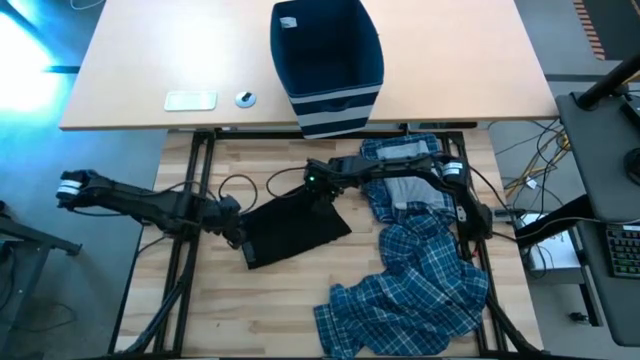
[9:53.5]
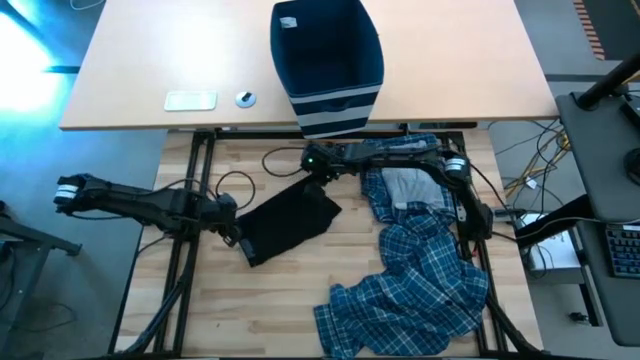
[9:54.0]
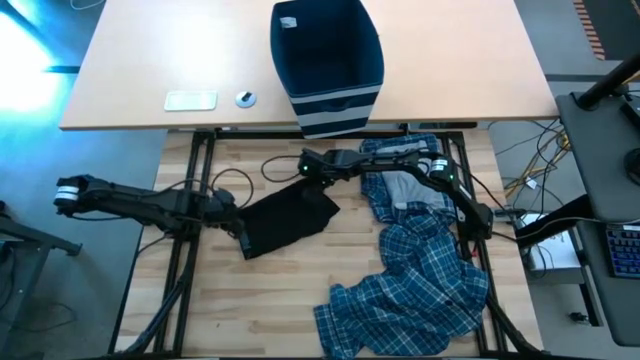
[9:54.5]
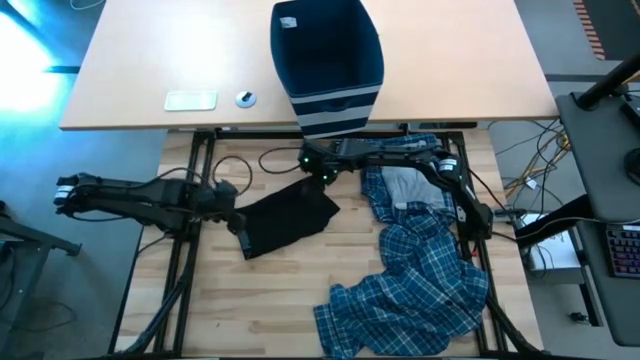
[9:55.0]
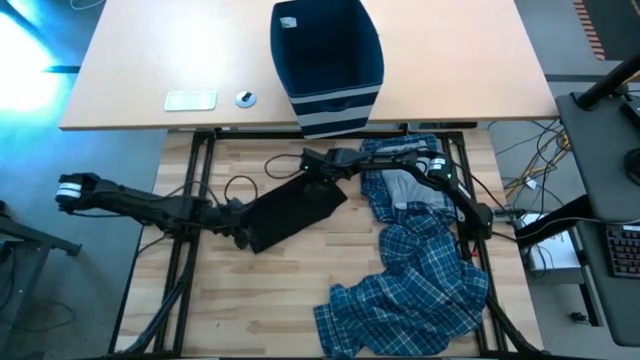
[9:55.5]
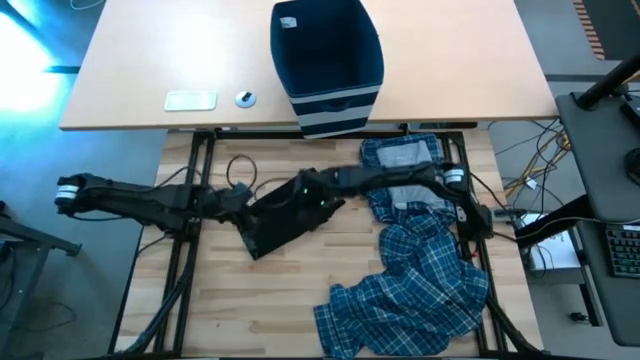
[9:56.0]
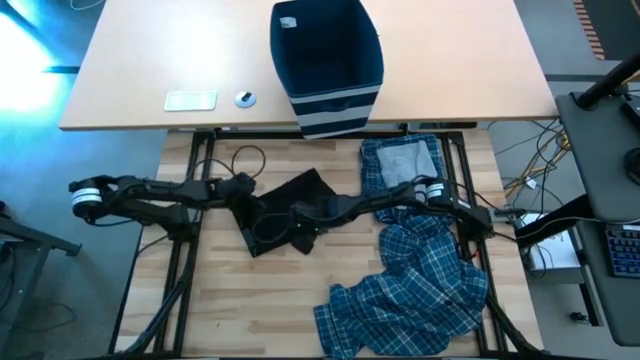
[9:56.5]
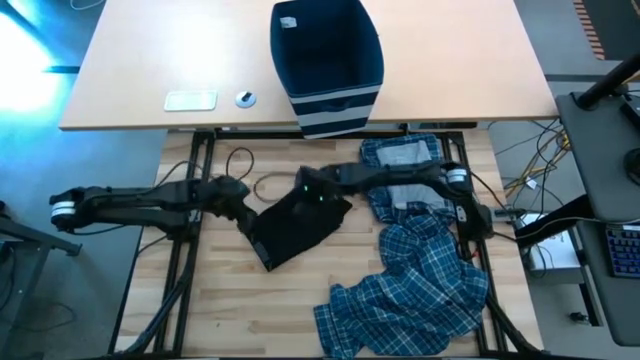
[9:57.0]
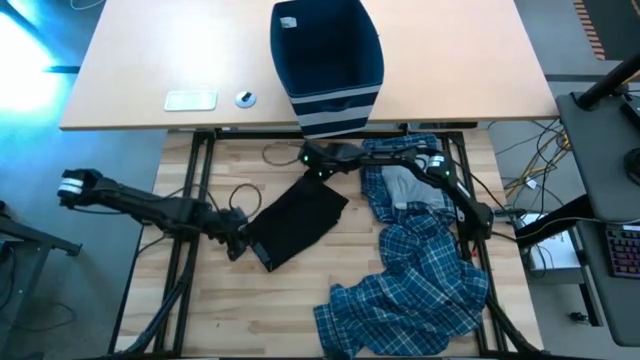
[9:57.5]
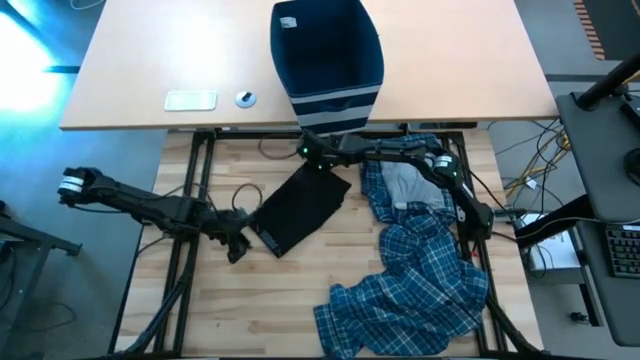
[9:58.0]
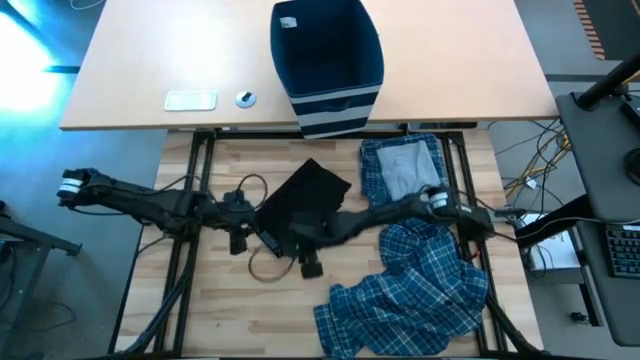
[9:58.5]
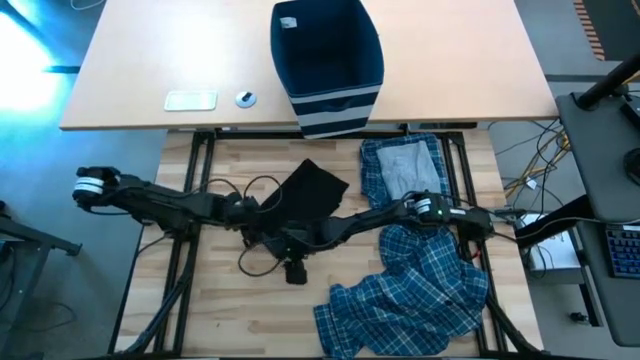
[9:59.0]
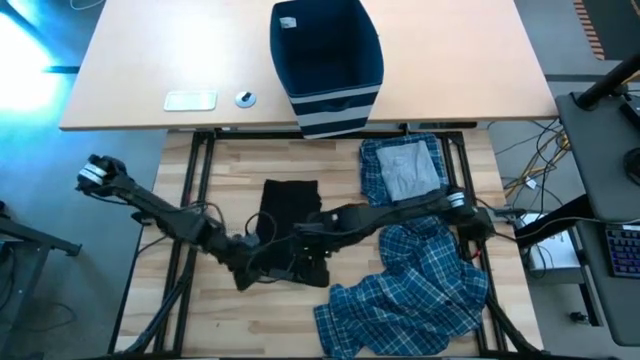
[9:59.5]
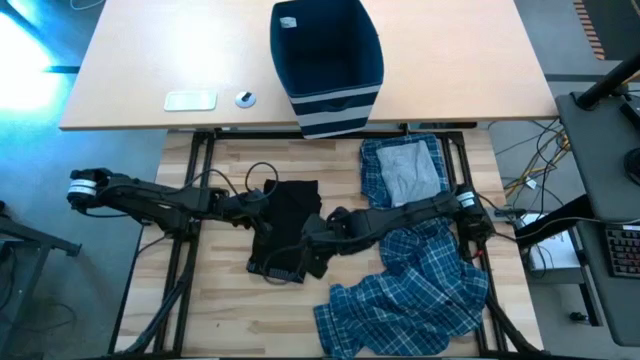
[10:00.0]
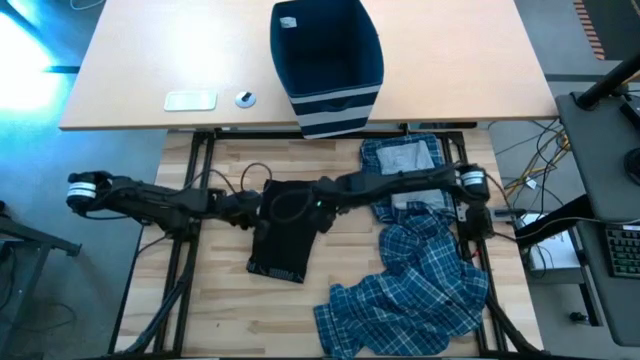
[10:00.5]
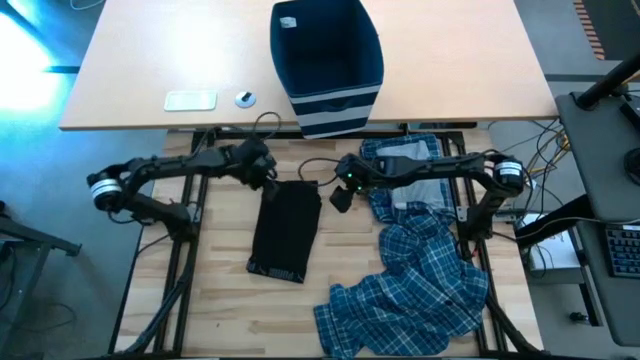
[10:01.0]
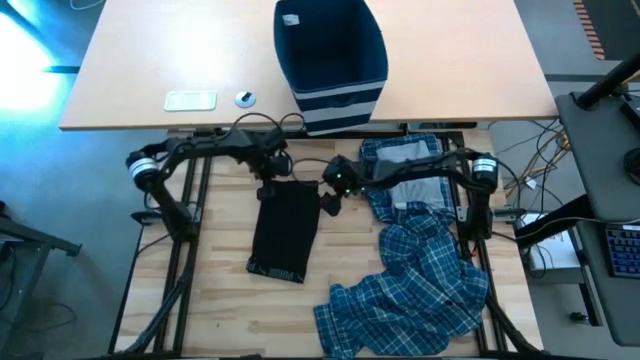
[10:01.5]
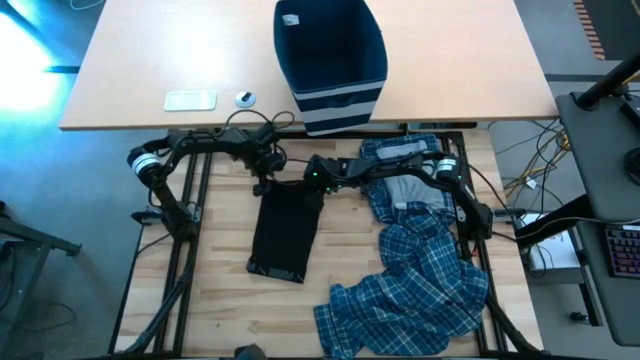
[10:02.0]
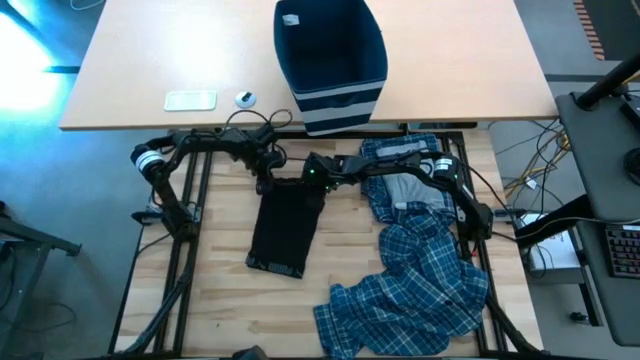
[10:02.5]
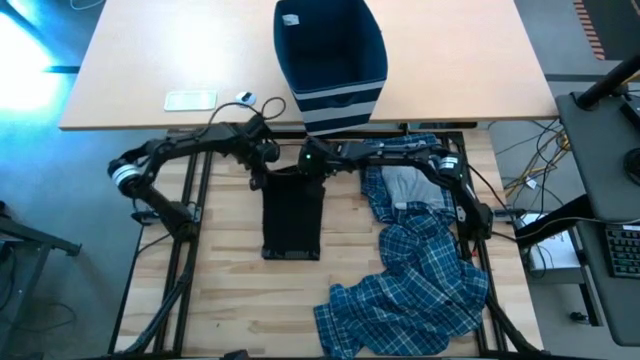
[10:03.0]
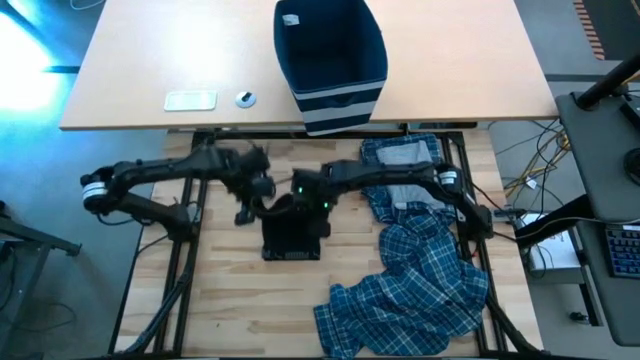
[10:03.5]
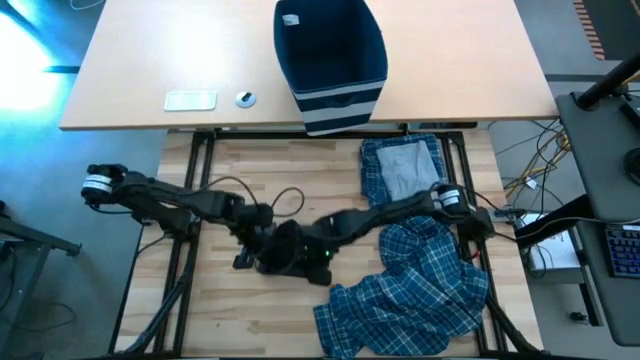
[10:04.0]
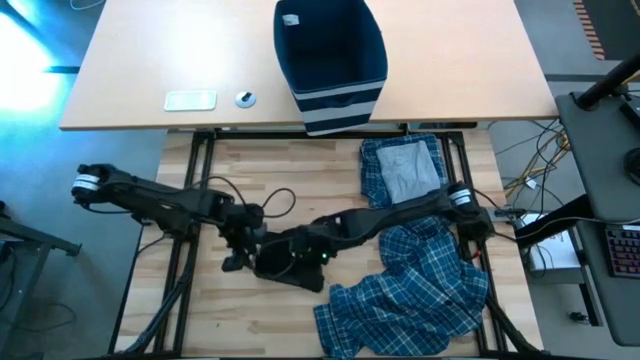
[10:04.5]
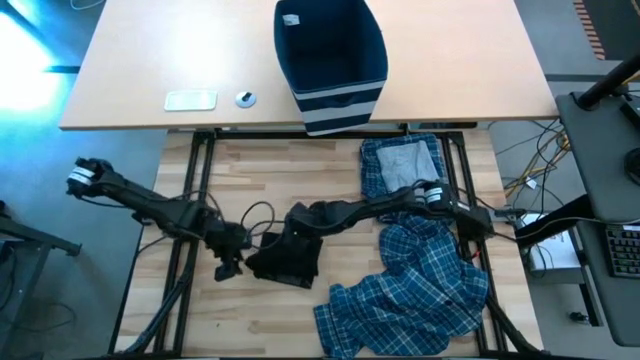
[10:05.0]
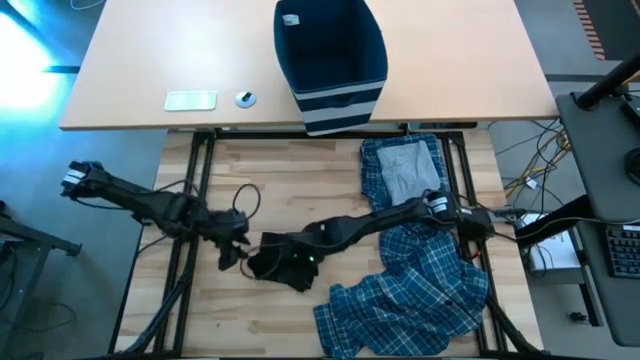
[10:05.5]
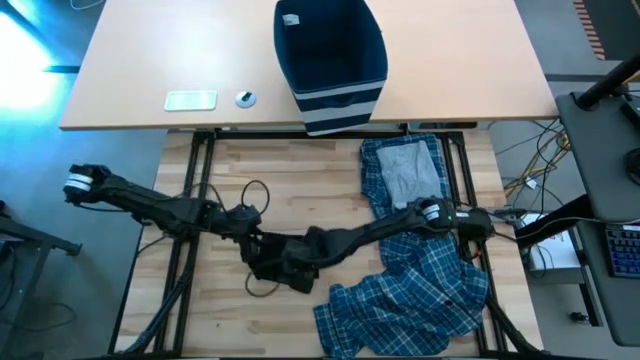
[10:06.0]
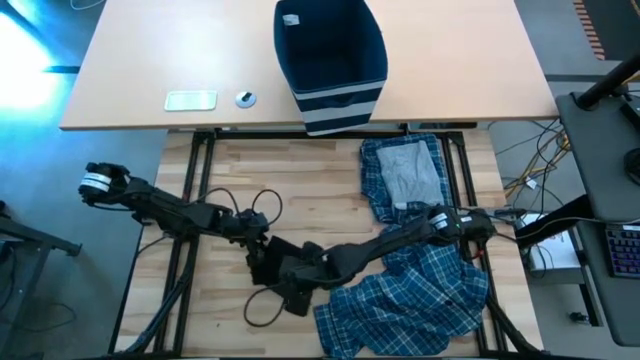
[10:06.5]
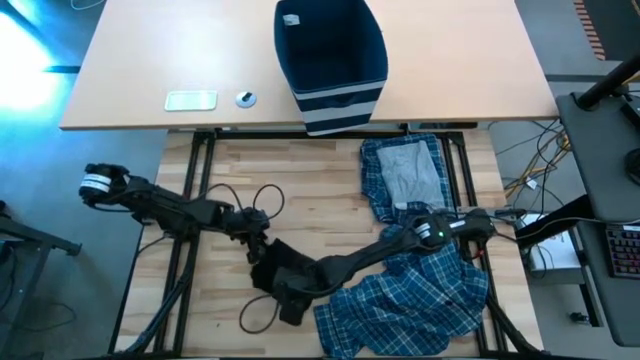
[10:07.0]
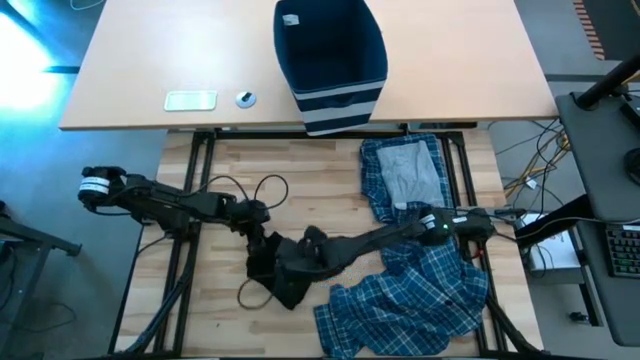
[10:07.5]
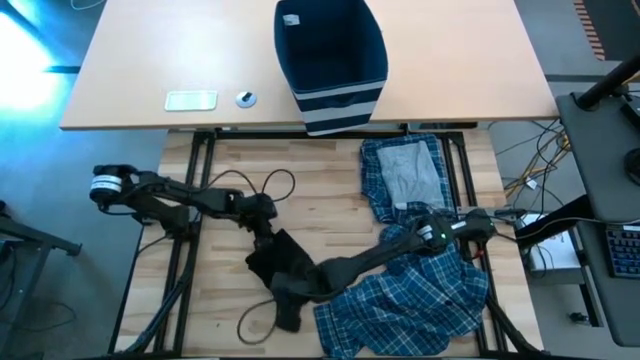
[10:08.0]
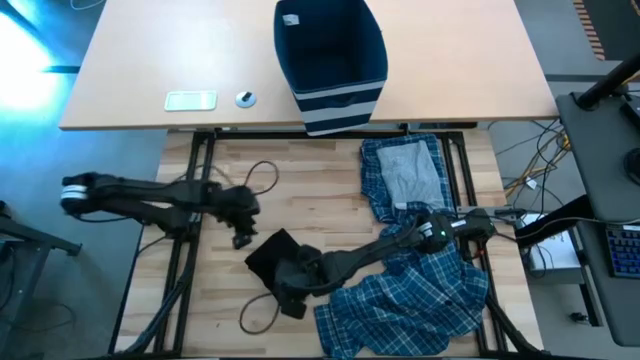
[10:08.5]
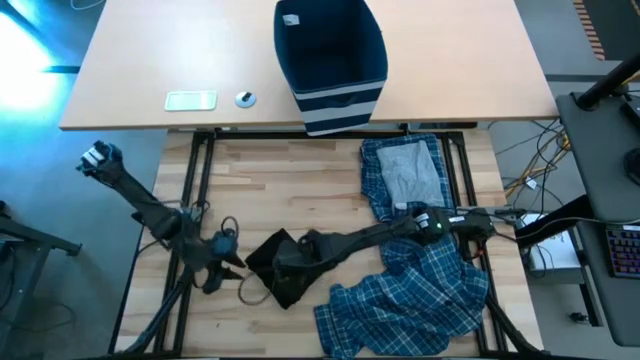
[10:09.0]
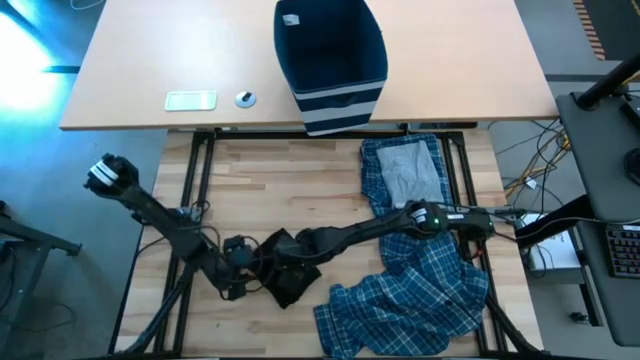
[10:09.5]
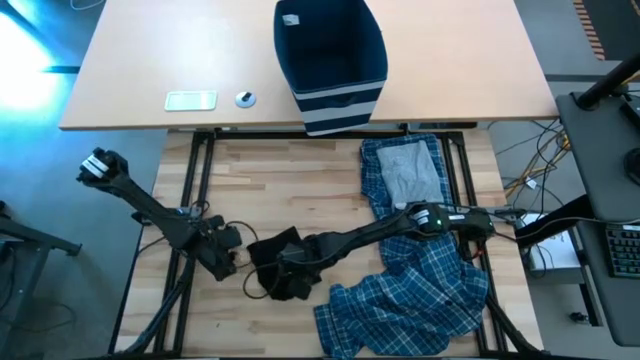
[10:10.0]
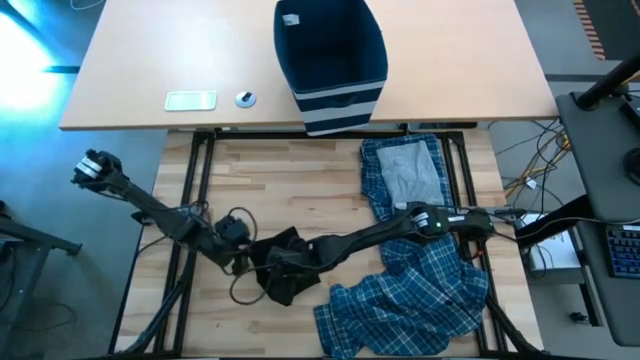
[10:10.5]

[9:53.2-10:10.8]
Task: Fold Laundry from Bin
Fold the black boxer short

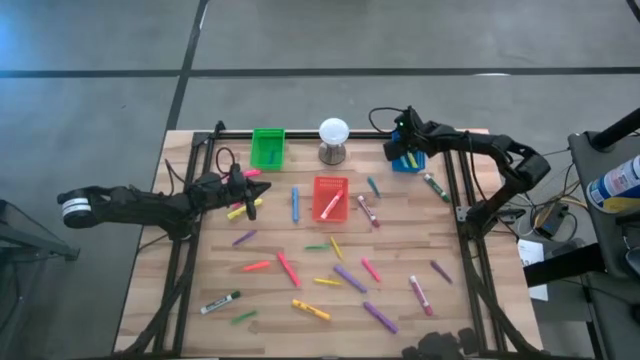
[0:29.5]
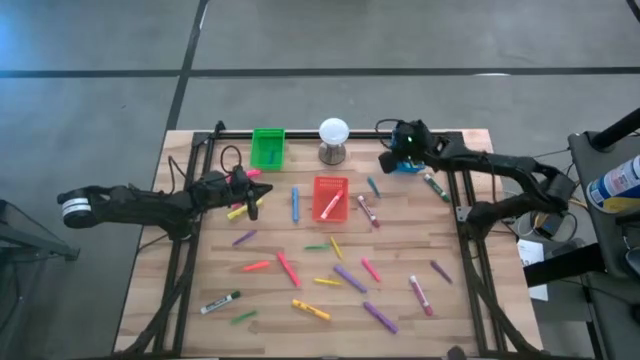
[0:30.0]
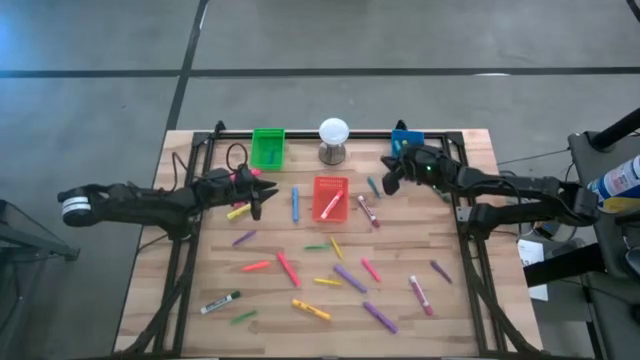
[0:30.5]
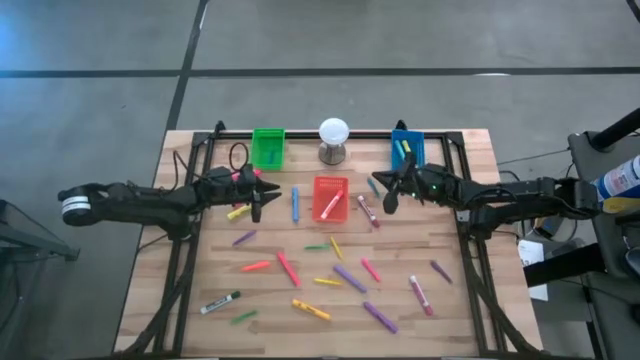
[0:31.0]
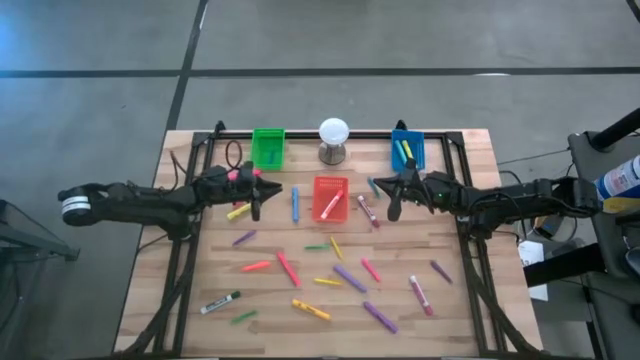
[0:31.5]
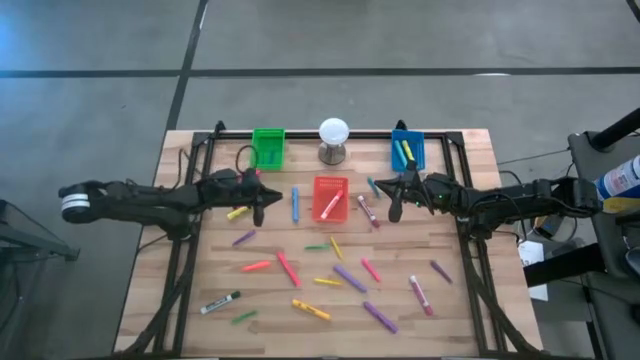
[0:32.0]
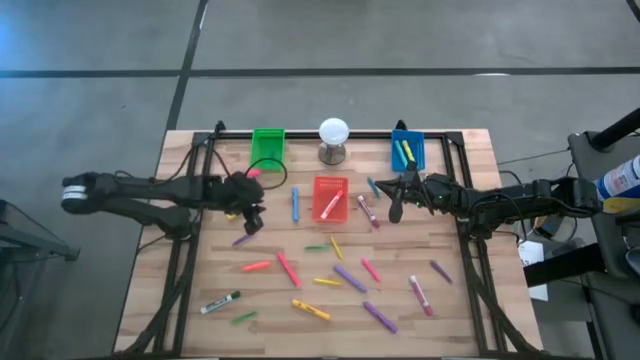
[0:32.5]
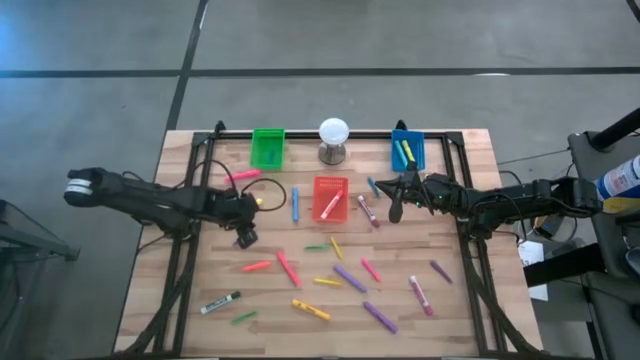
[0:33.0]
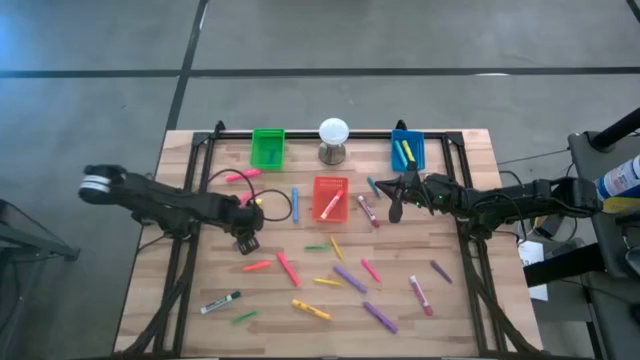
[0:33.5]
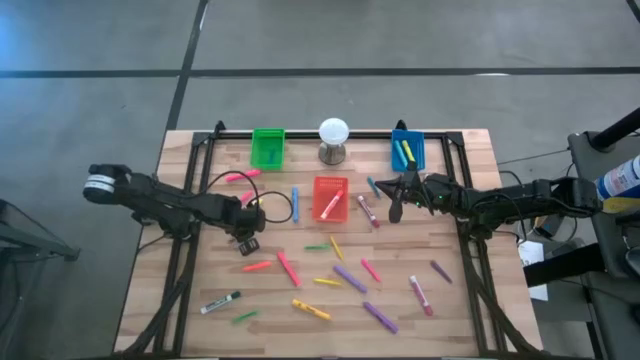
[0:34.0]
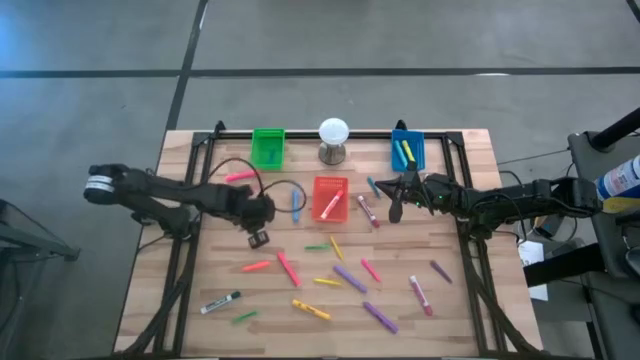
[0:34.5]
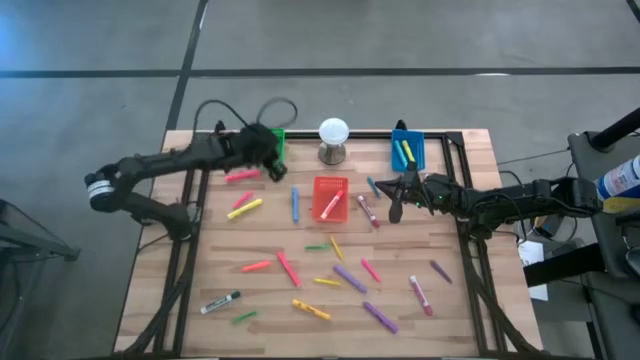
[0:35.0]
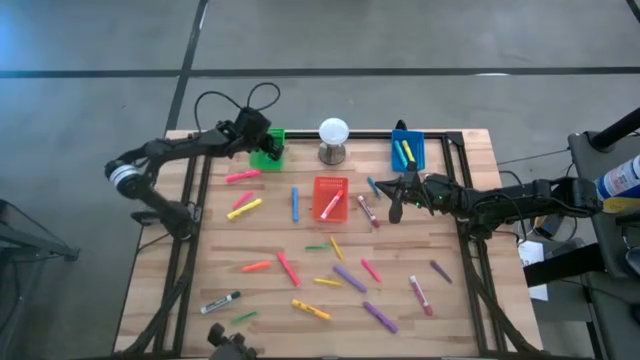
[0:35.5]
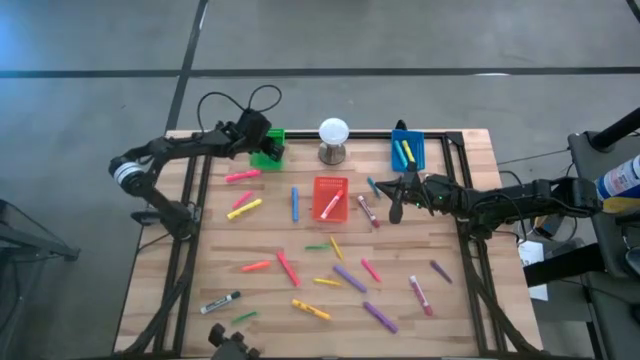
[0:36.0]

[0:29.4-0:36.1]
Task: Pick & Place Markers
Put the left purple pen into the green bin
